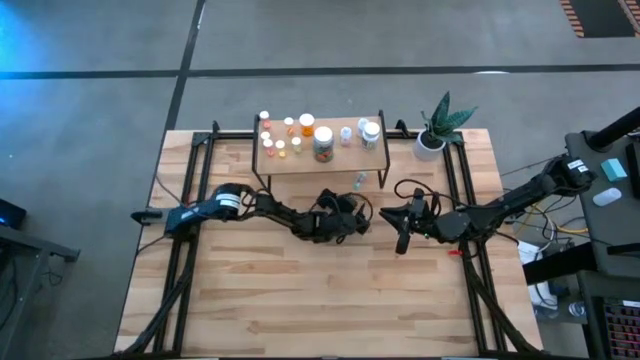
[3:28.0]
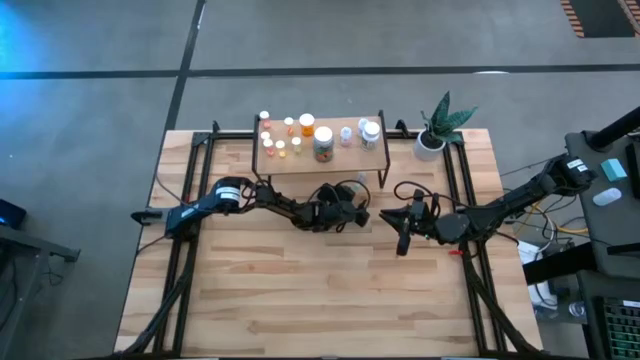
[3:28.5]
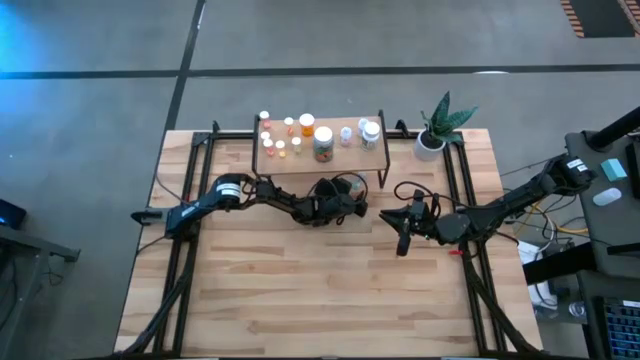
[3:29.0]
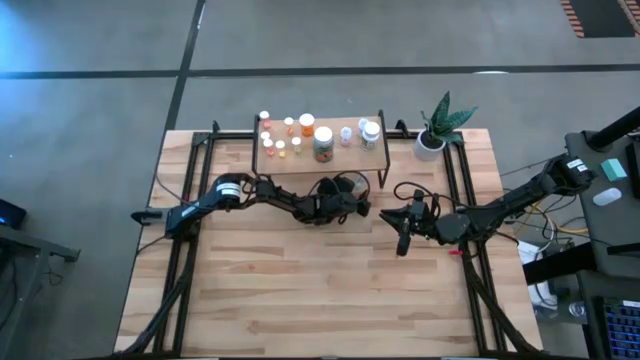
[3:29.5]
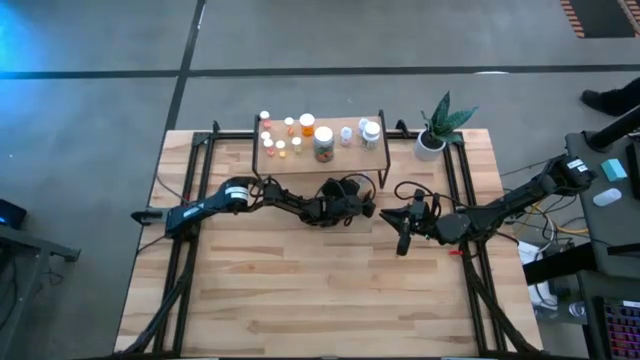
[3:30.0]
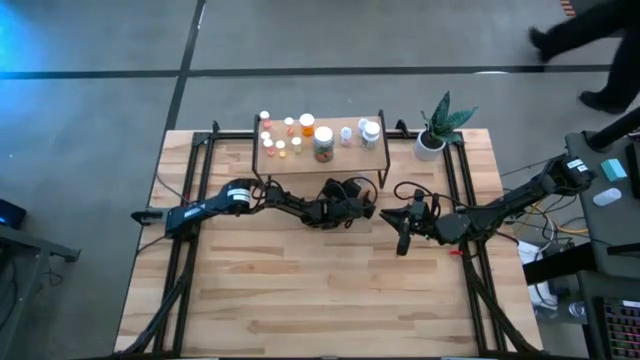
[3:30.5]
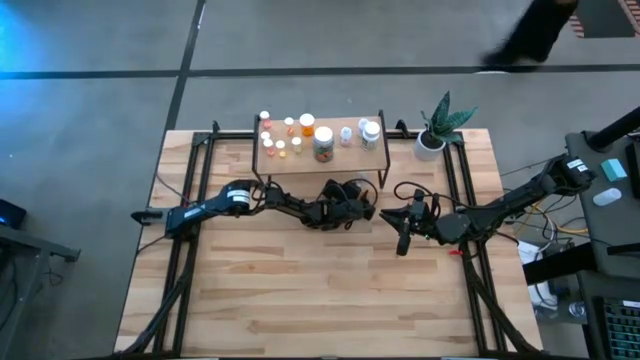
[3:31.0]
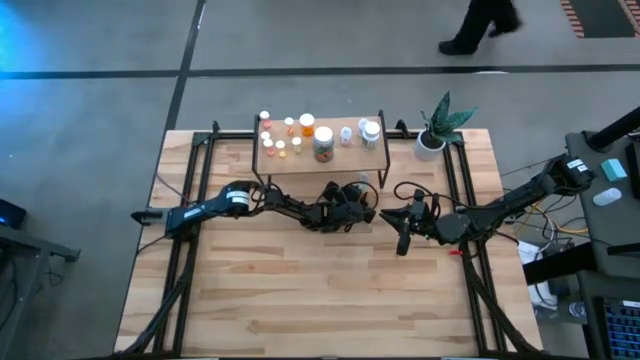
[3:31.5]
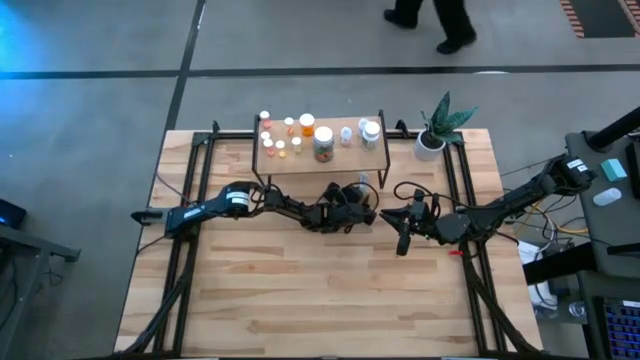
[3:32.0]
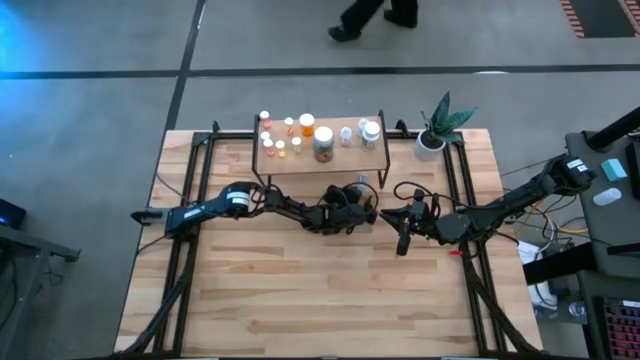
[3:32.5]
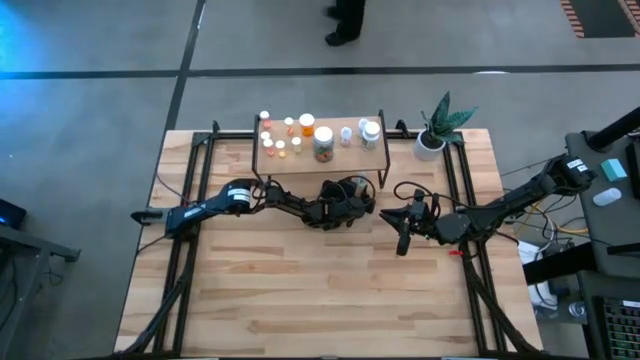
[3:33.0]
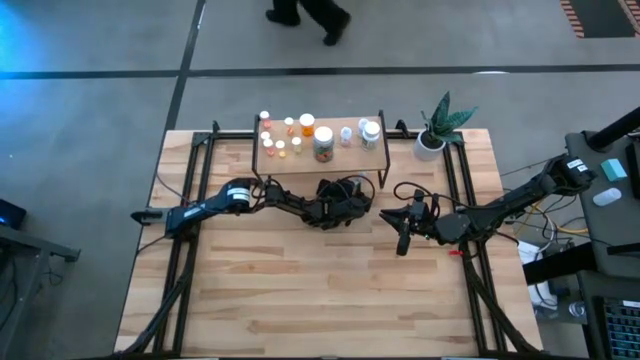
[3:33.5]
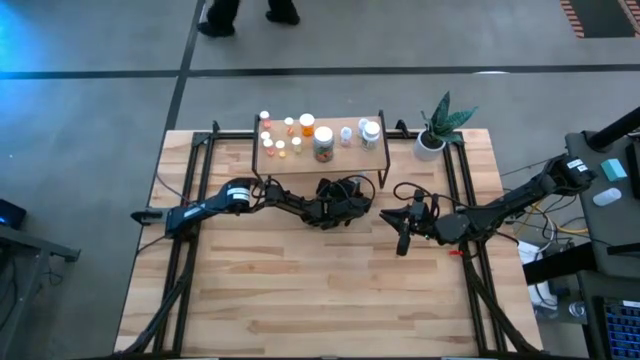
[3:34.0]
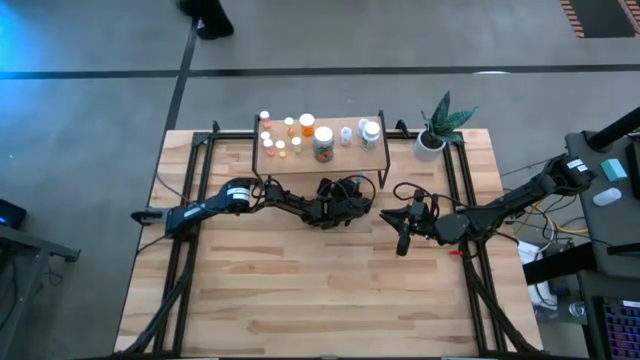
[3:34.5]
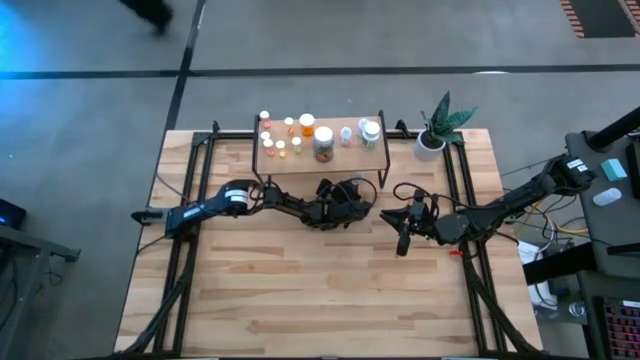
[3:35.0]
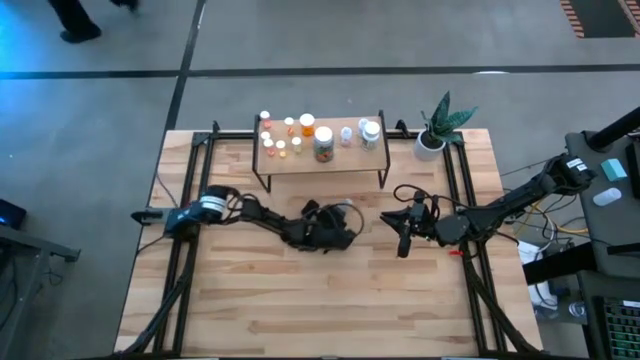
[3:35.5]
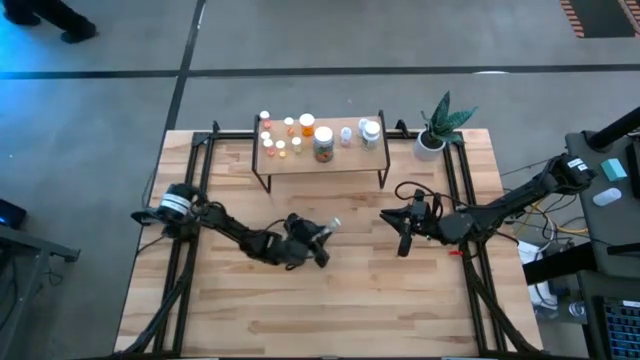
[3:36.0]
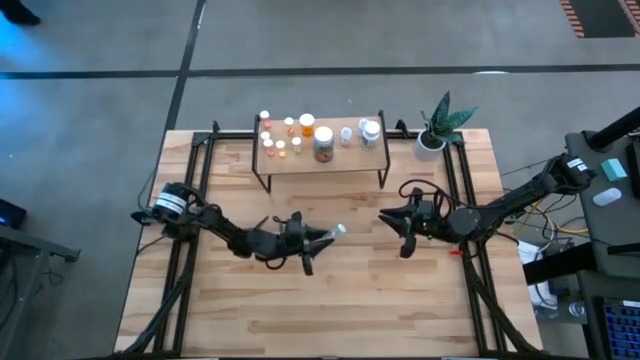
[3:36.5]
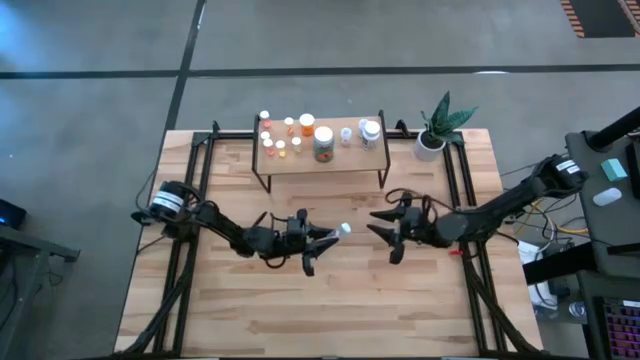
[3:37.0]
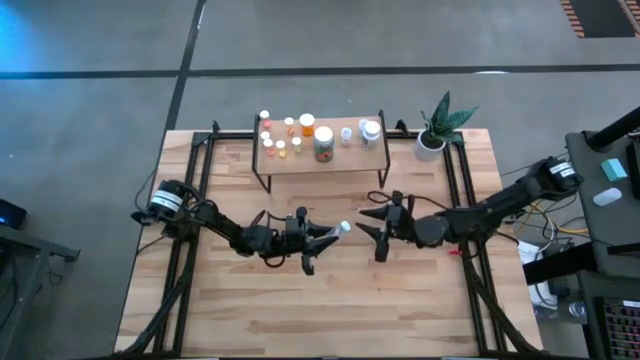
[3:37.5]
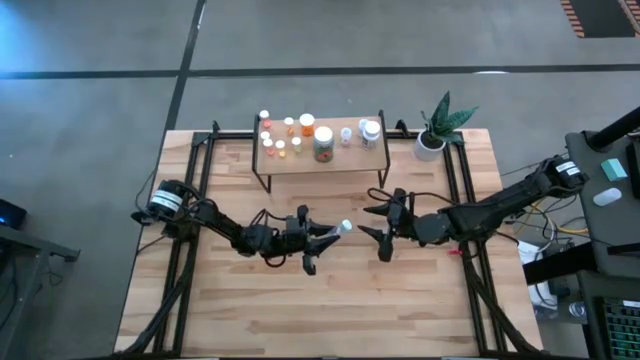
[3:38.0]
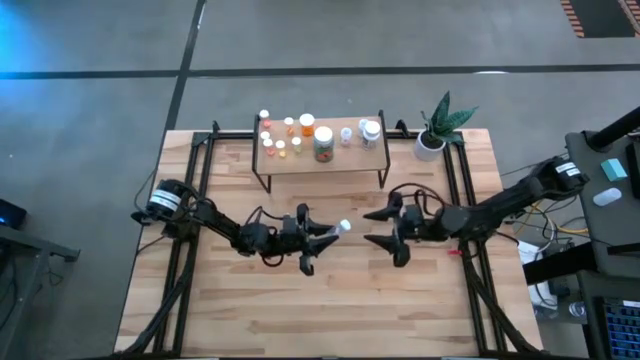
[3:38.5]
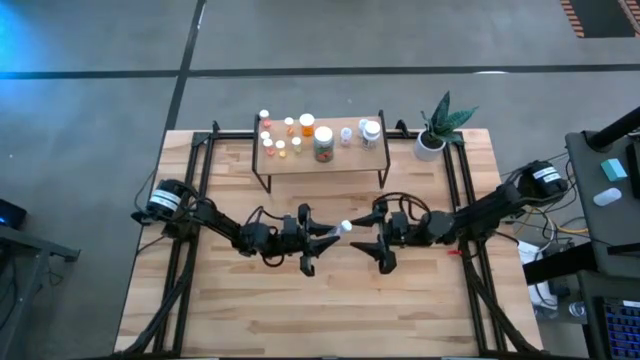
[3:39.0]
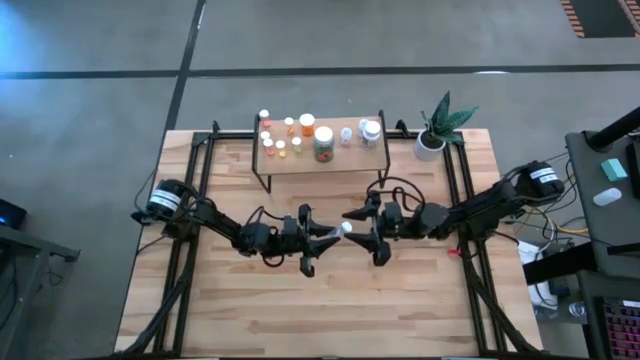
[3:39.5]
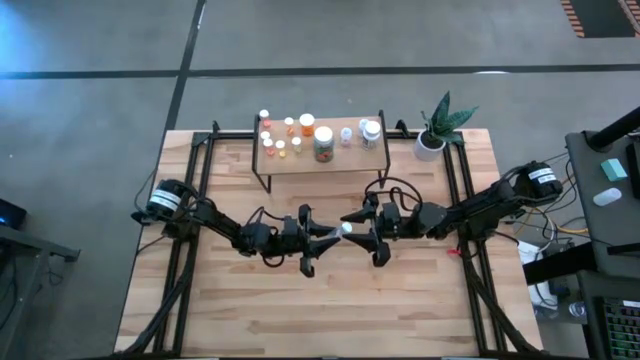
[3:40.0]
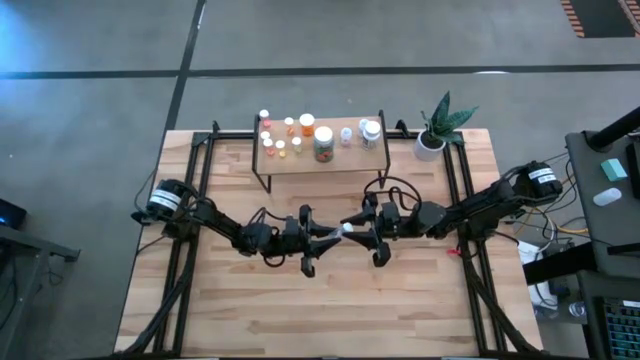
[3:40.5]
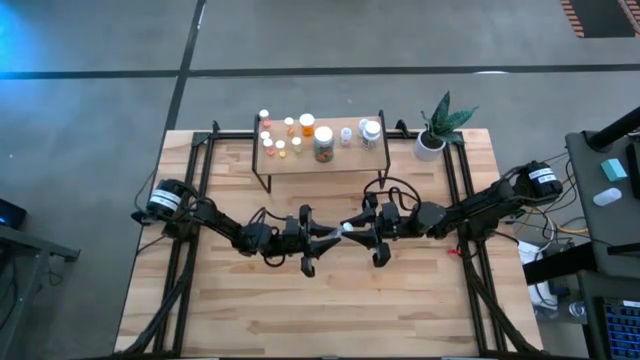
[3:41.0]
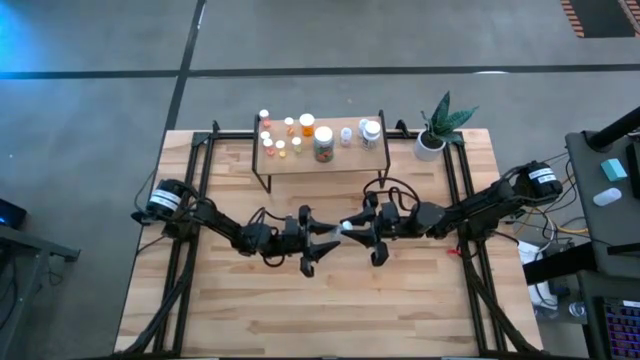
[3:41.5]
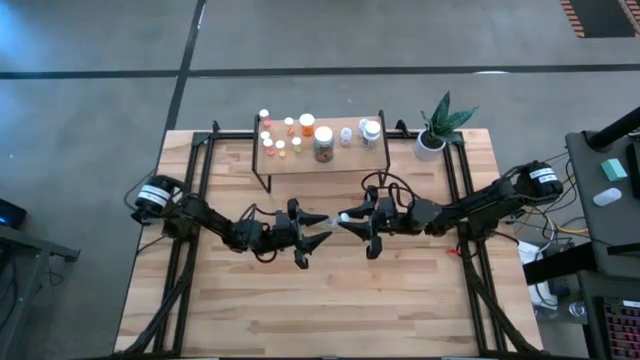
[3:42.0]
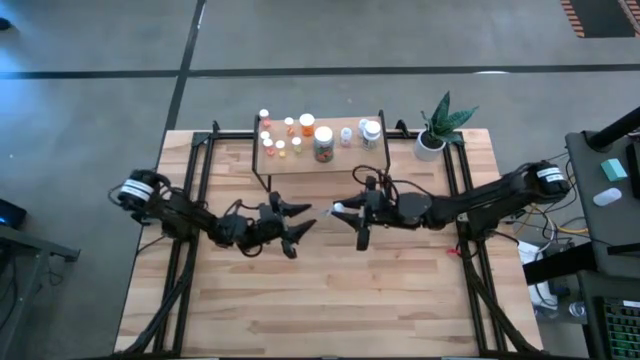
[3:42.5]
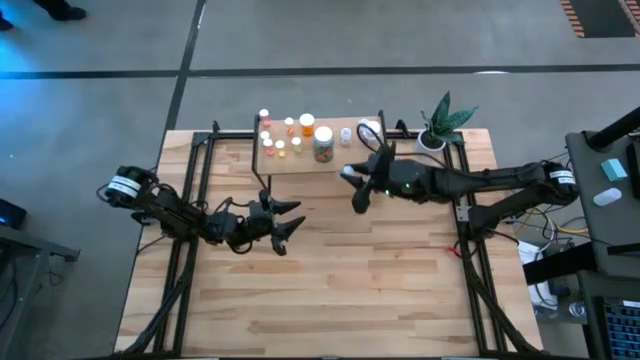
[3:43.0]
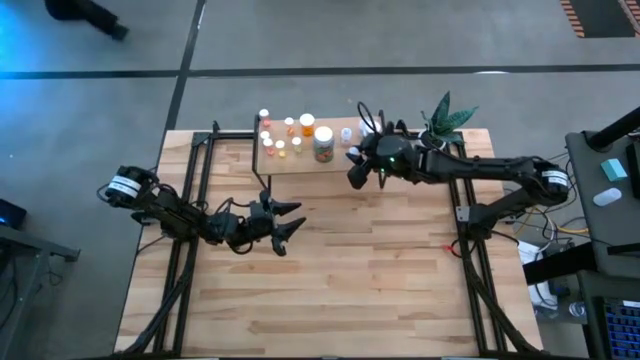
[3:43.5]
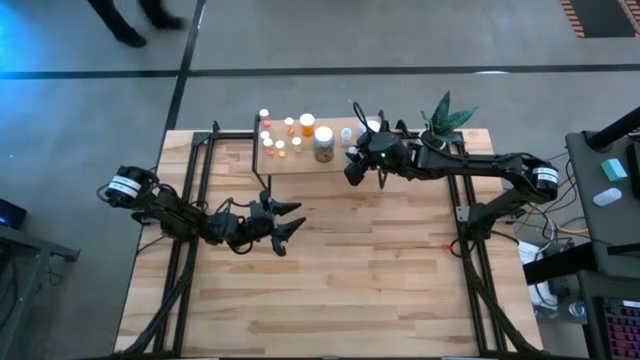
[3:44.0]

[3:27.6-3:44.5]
Task: Pick and place medicine bottles onto shelf by color
Put the blue pill bottle on the shelf
